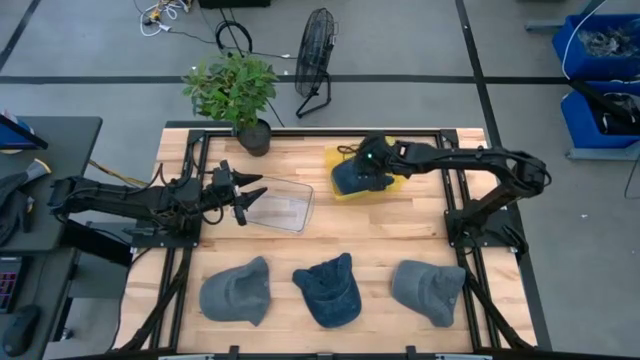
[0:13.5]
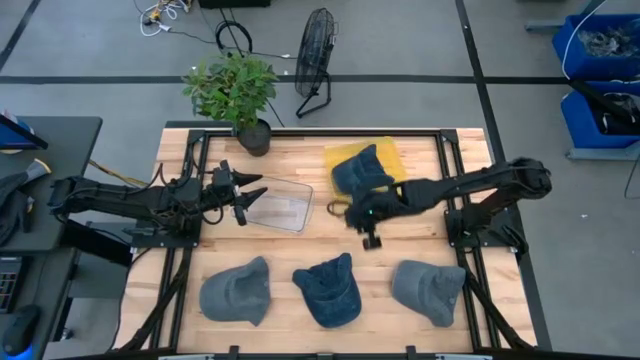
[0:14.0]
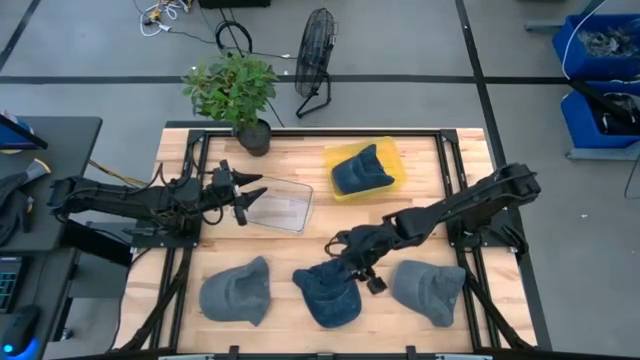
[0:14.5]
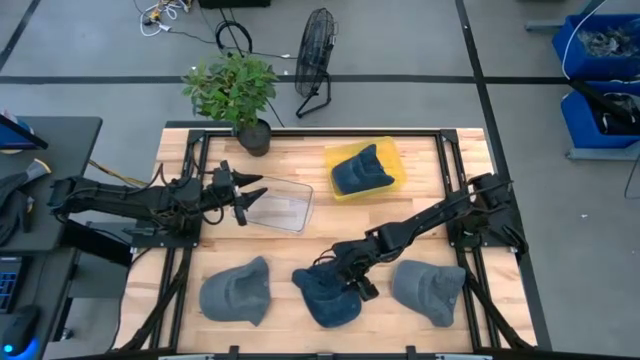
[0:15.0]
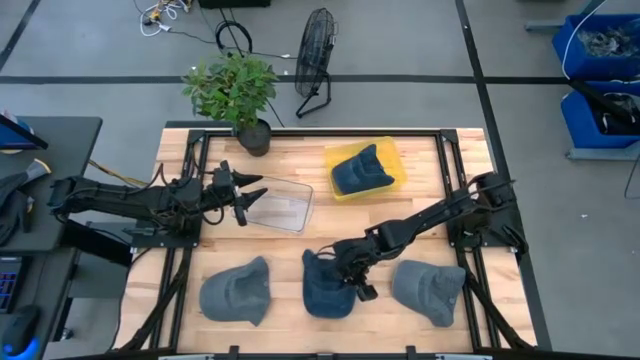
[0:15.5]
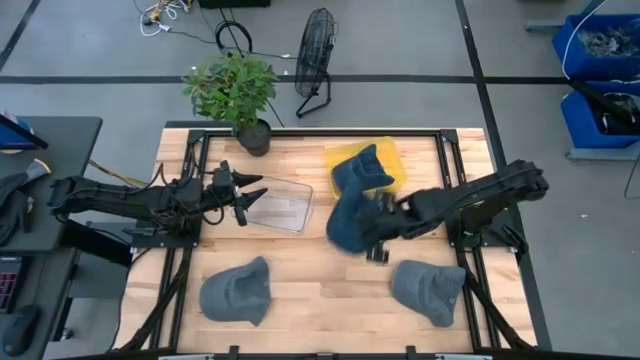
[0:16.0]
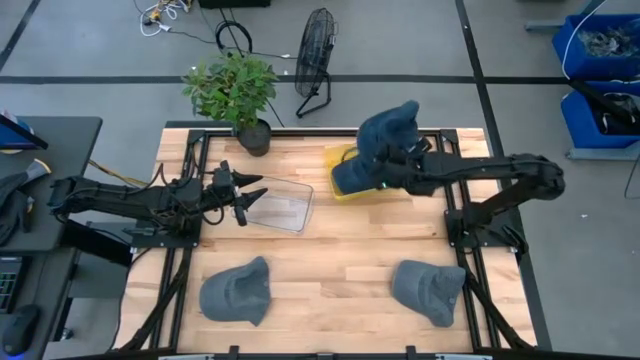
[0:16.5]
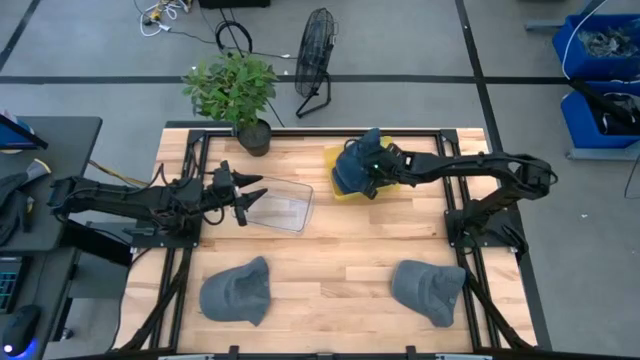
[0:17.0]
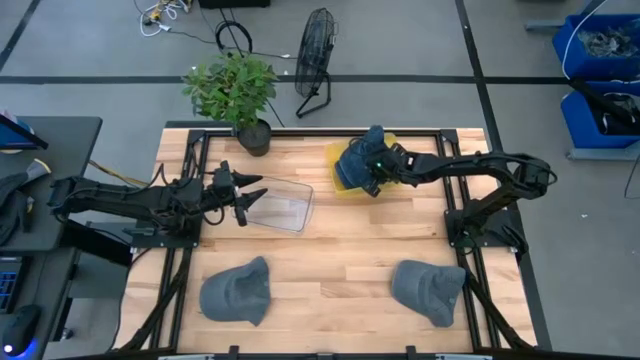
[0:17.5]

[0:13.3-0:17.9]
Task: Pick & Place hat
Put the blue cap into the yellow bin

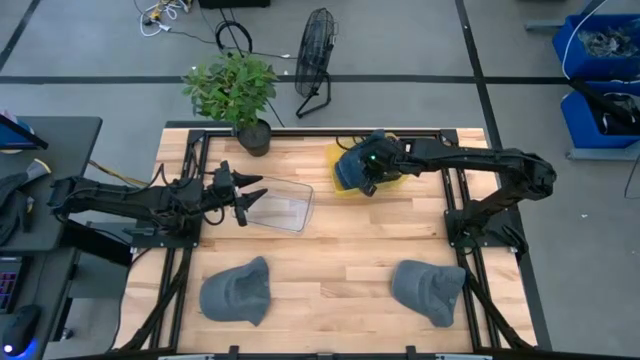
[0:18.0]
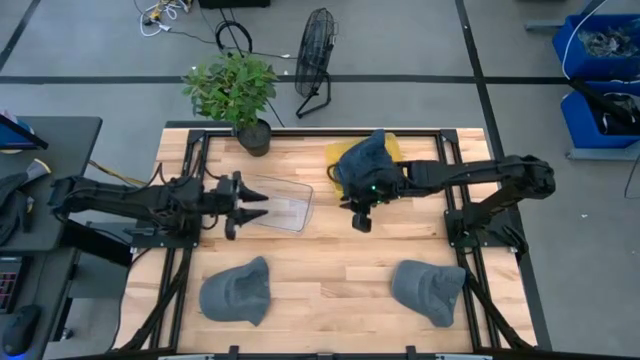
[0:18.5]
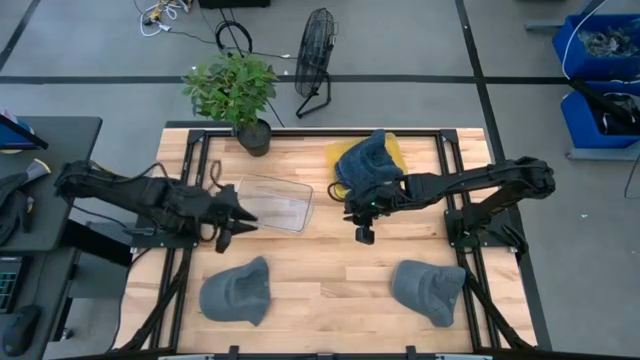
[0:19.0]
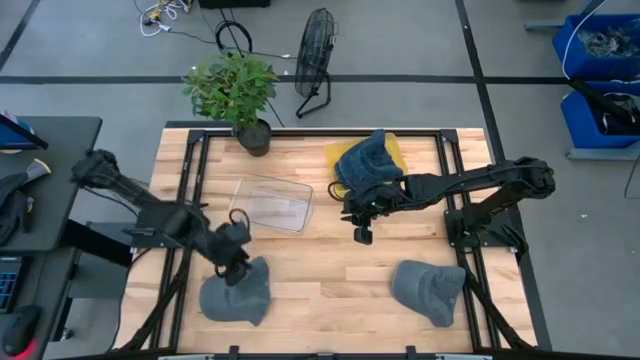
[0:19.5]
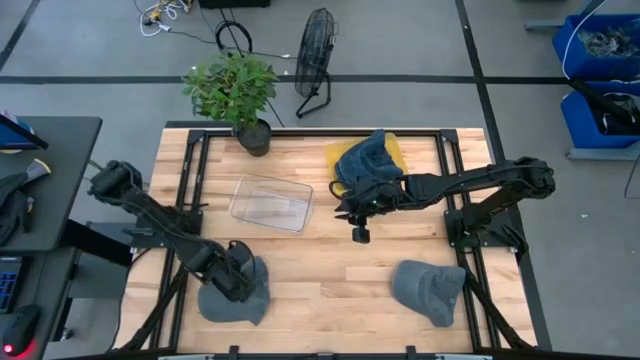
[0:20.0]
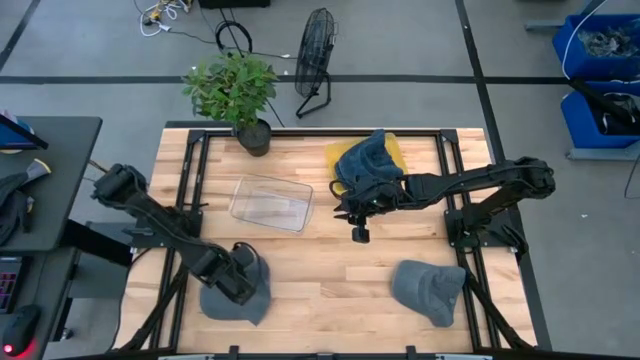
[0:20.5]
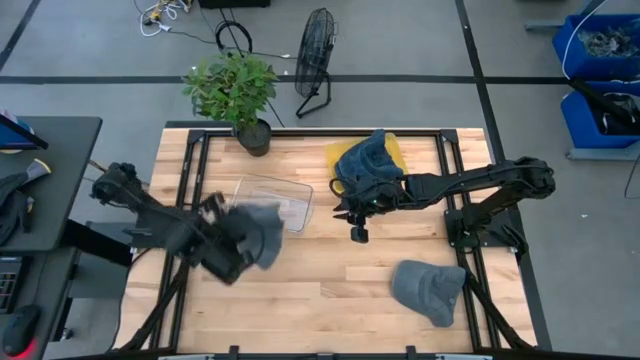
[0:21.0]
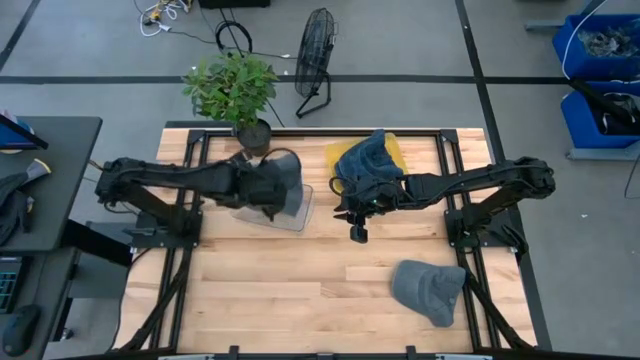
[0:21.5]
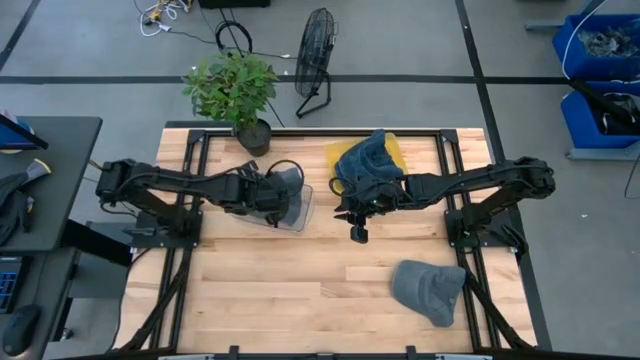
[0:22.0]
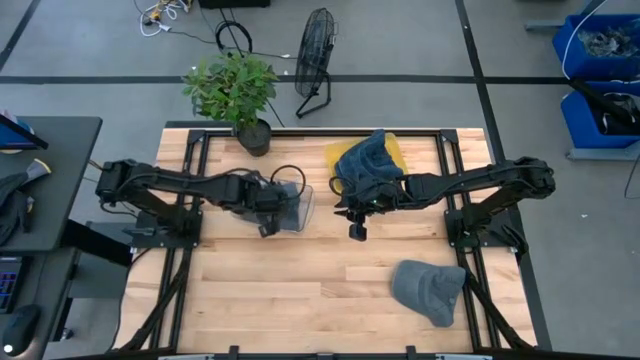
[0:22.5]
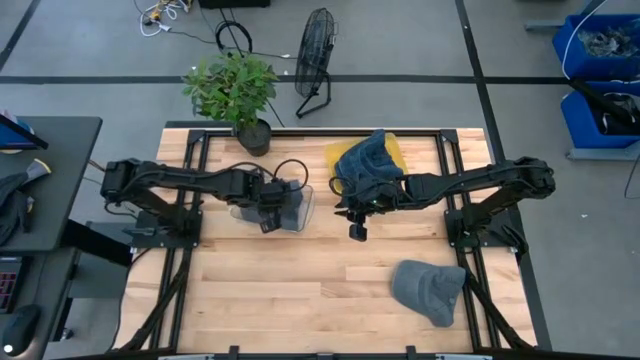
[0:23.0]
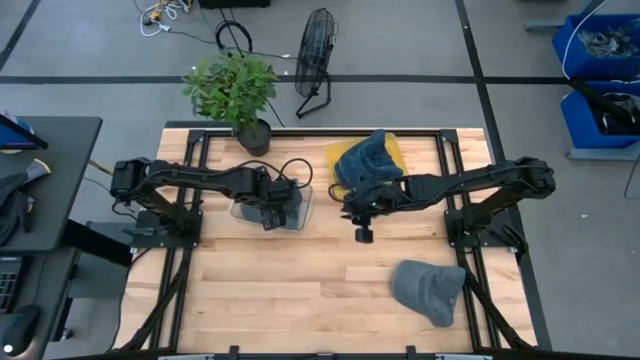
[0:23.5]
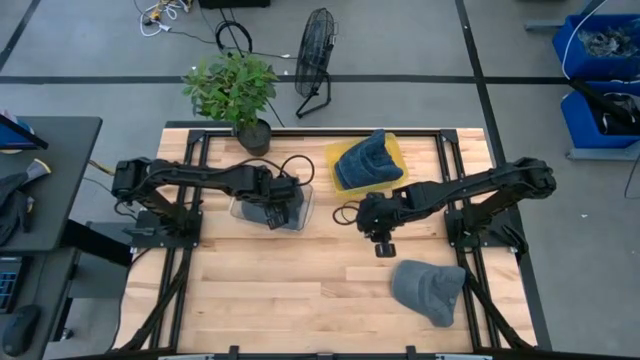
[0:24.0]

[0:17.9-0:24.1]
Put the left gray cap into the transparent bin

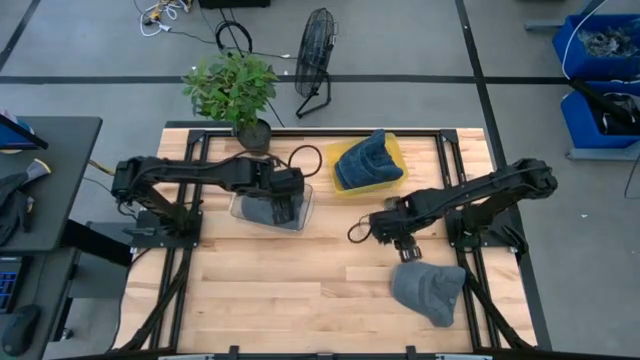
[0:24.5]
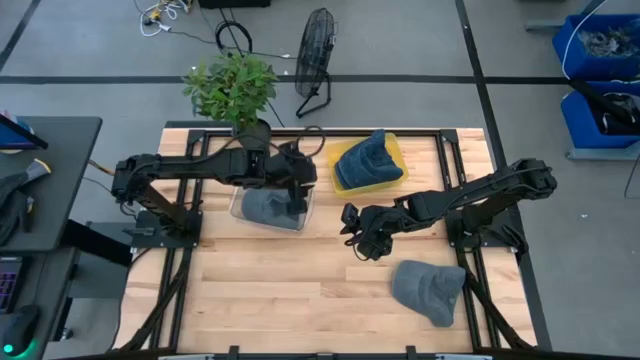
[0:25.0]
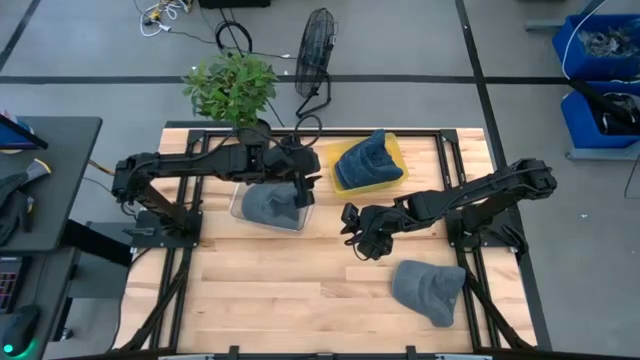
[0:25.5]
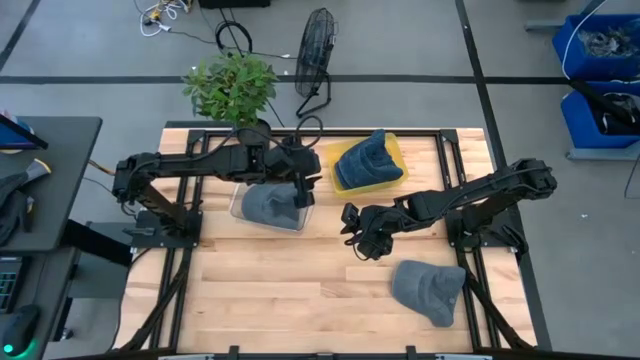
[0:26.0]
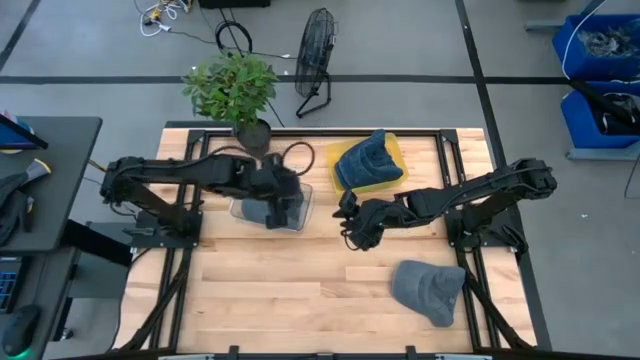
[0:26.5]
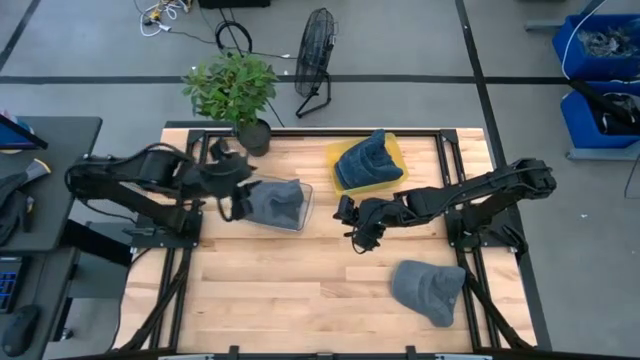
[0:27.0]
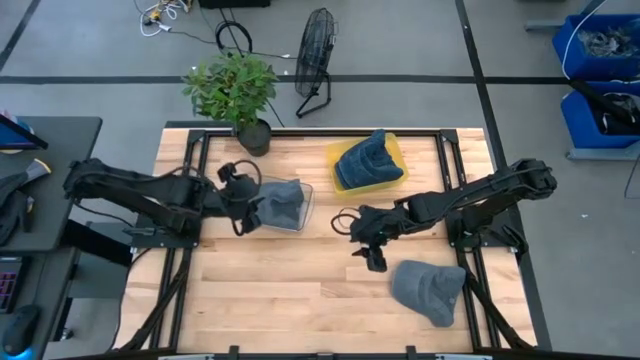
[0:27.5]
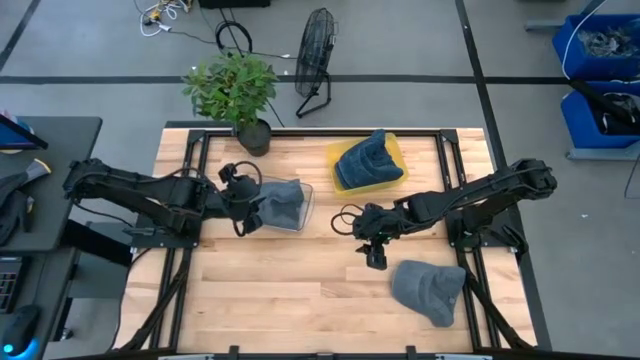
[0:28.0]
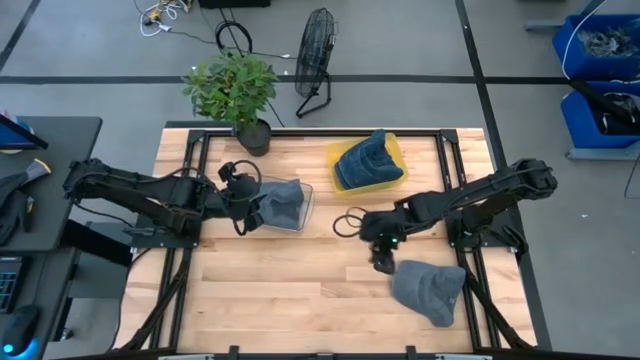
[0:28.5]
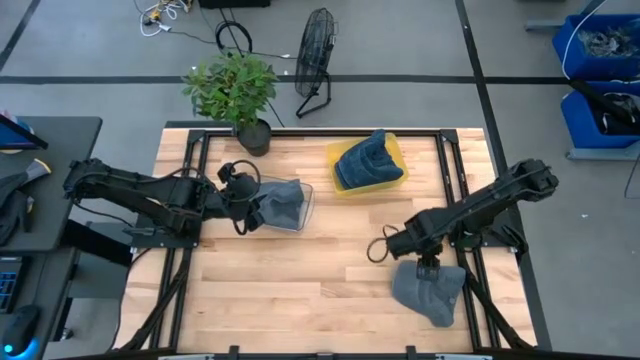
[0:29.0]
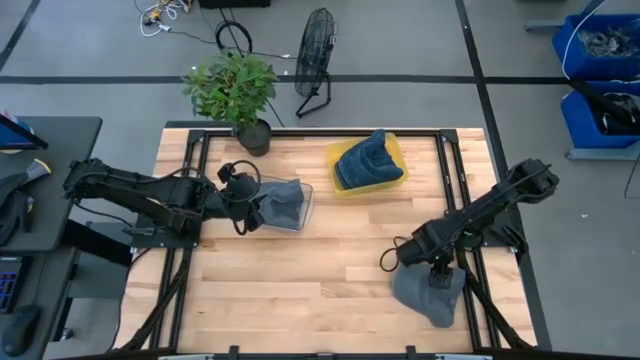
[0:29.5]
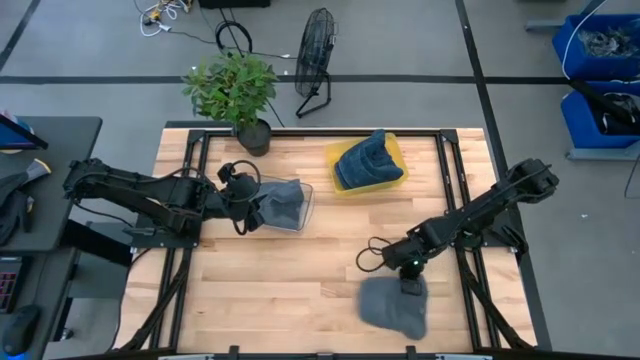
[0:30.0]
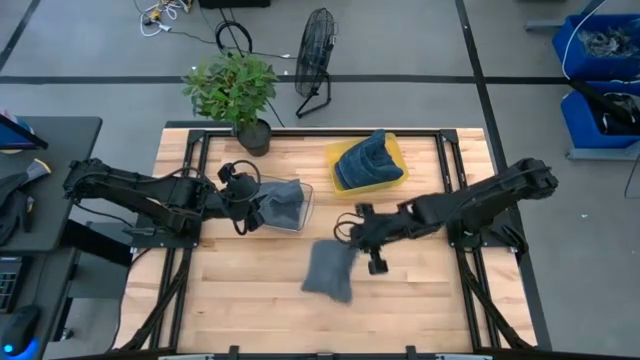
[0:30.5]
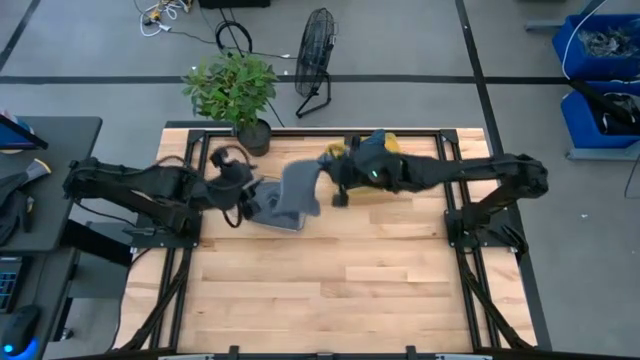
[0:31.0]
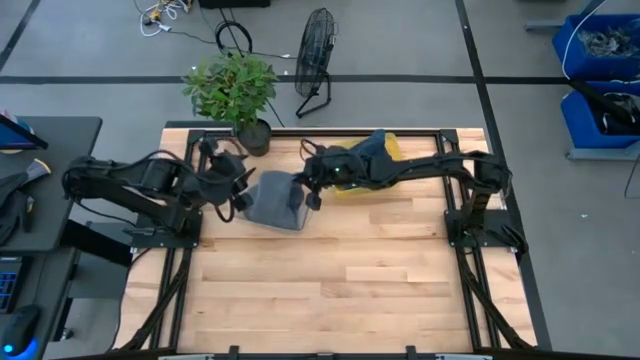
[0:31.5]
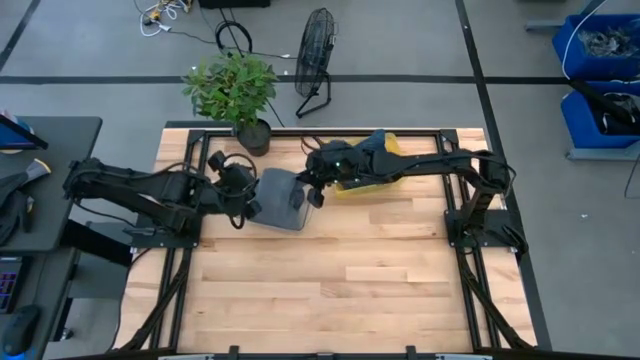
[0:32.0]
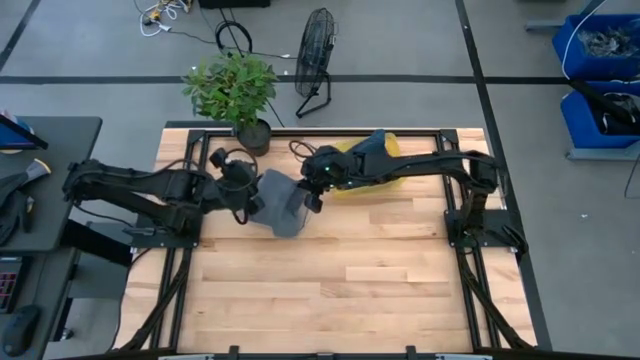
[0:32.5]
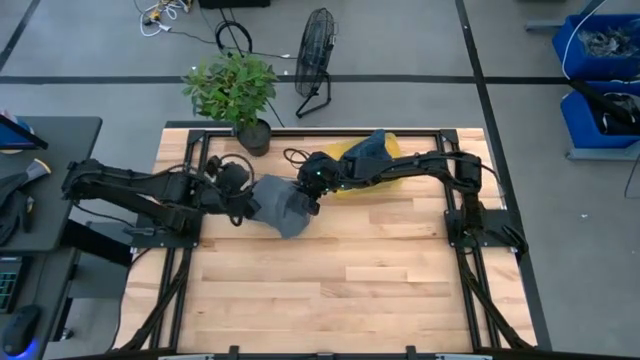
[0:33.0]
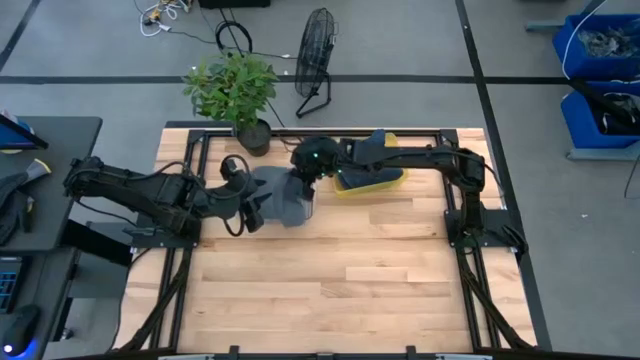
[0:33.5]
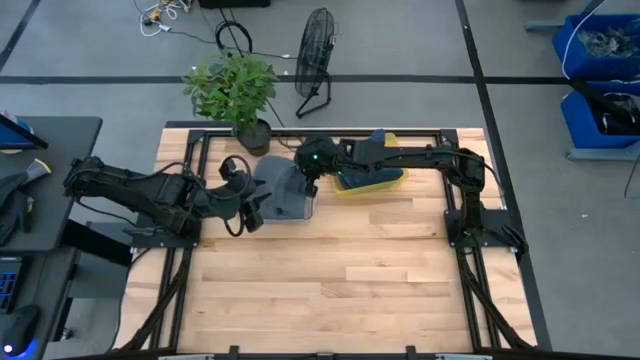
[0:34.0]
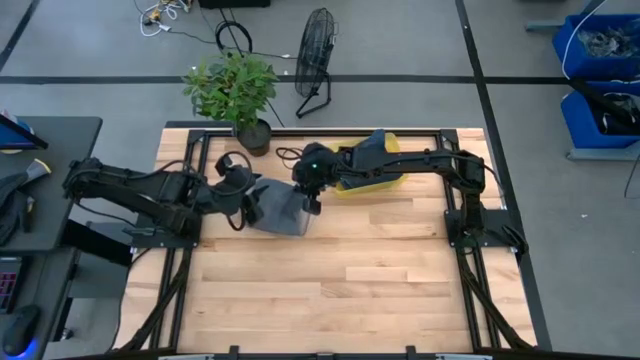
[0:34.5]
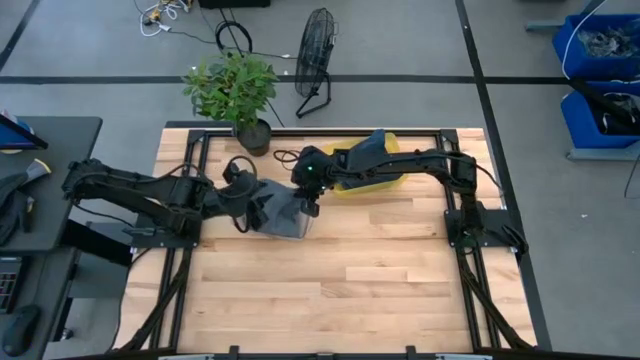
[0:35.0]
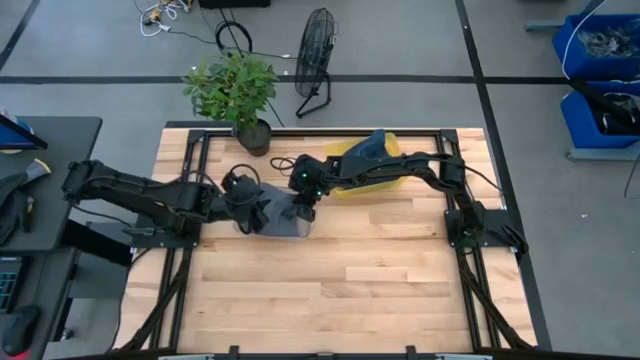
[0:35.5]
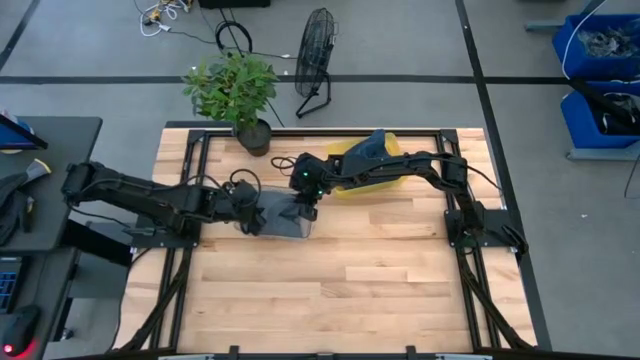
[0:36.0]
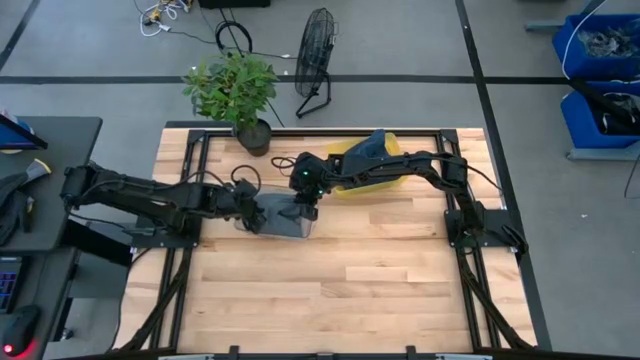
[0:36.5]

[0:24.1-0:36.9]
Put the gray cap into the transparent bin
